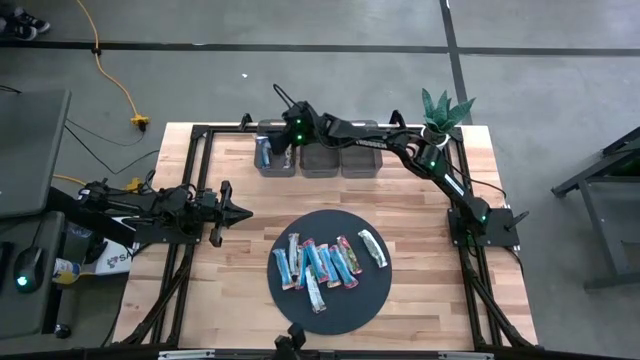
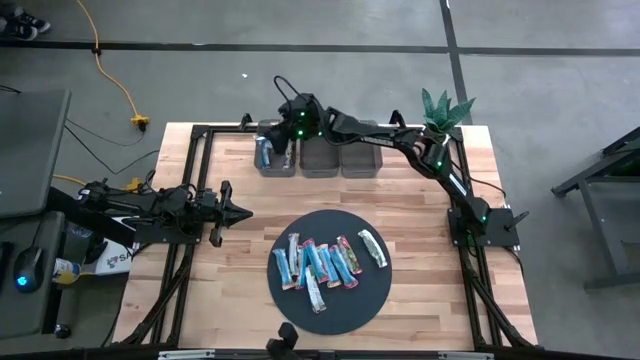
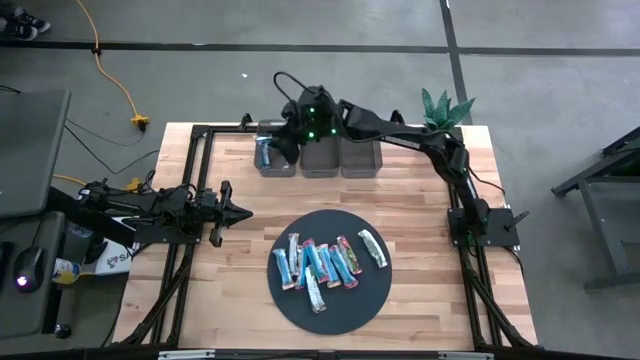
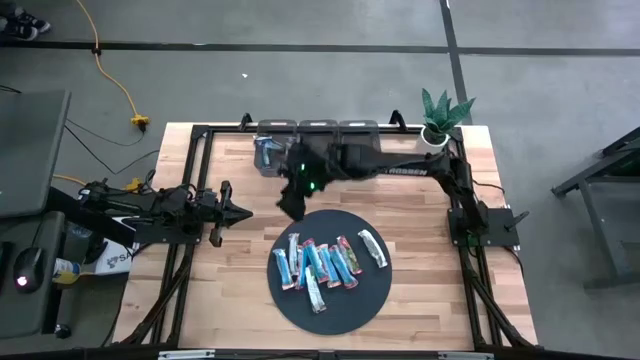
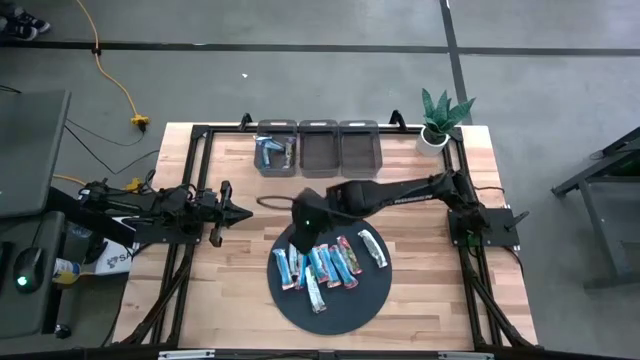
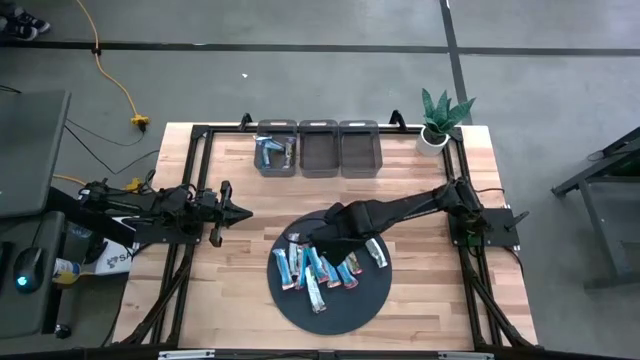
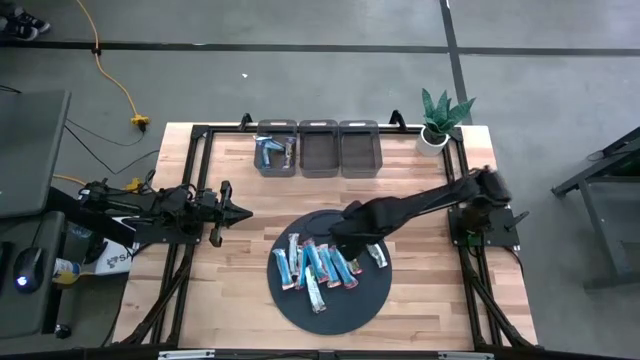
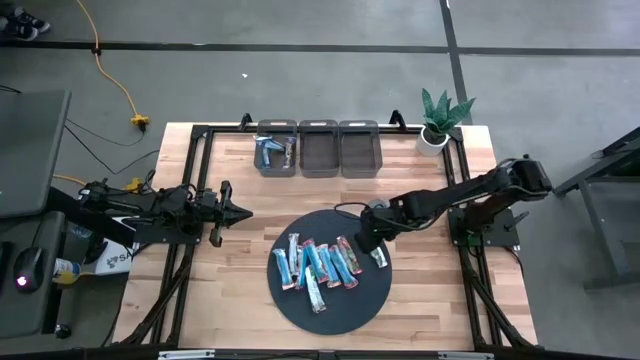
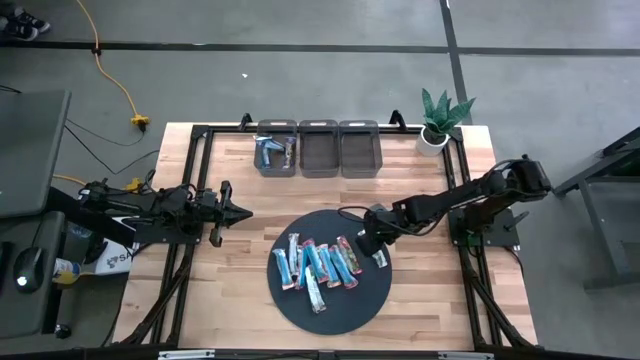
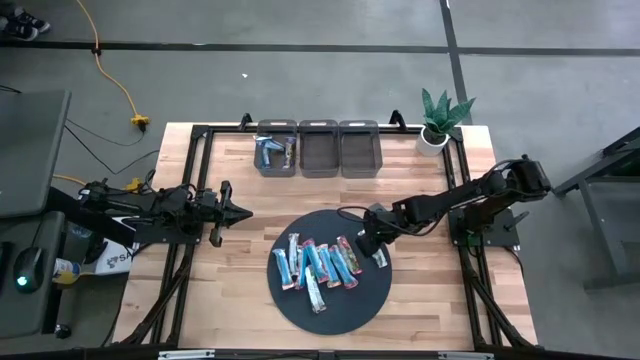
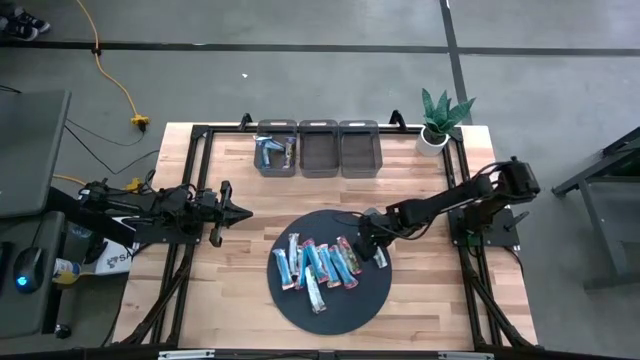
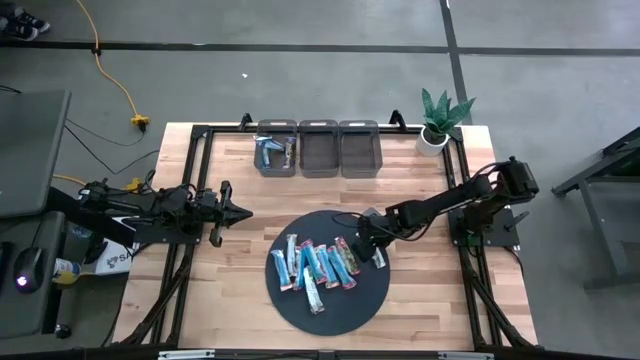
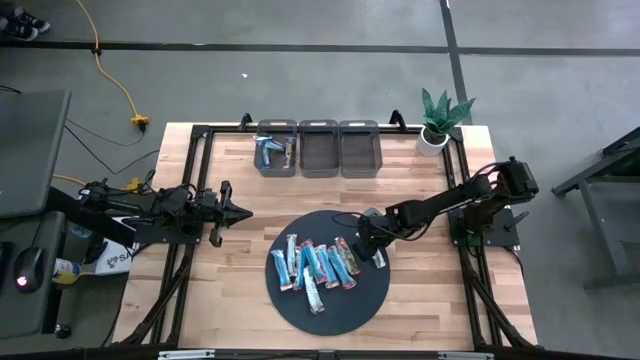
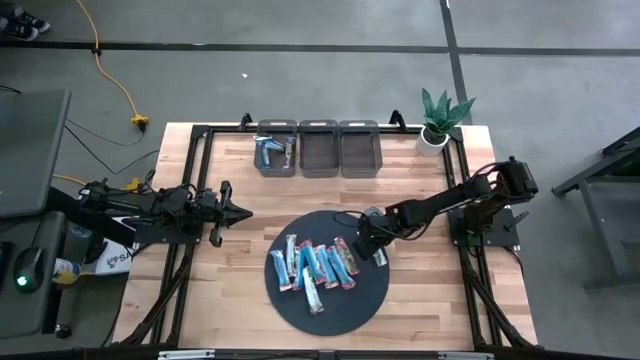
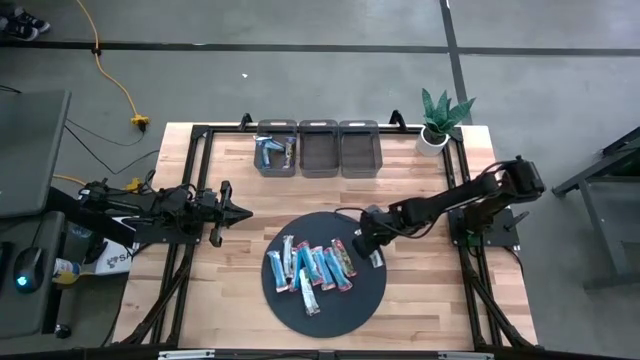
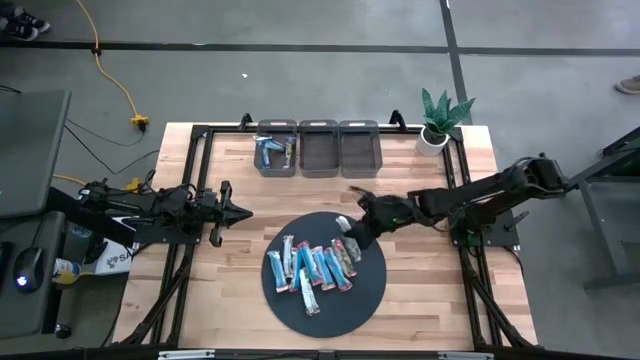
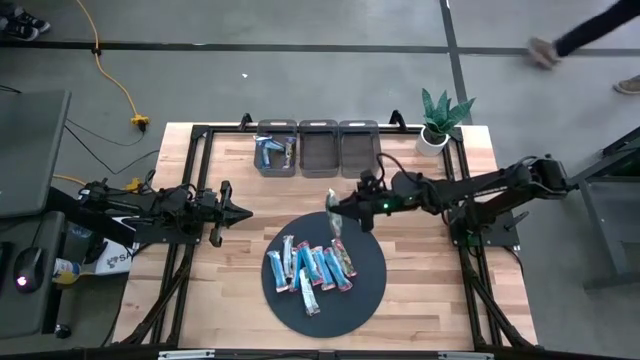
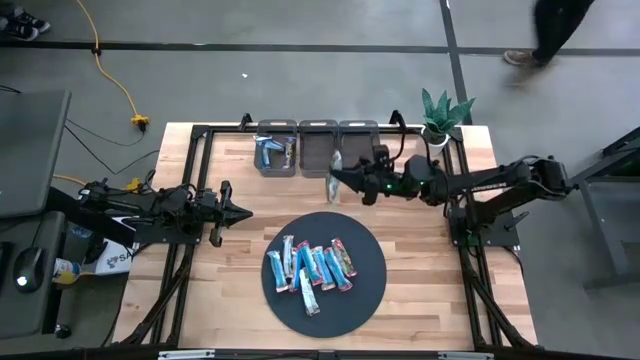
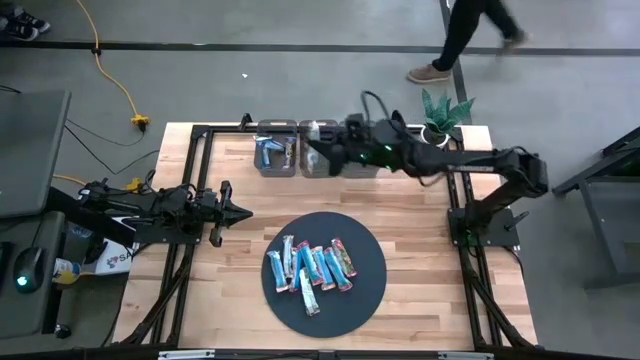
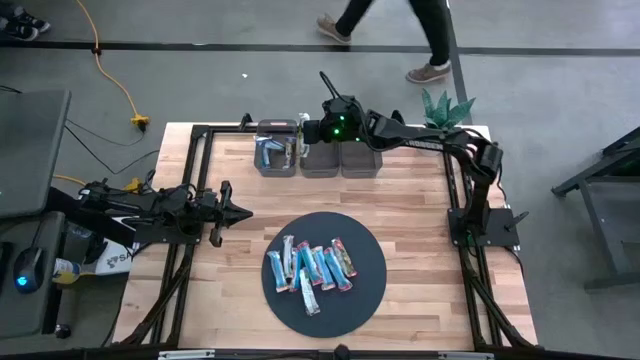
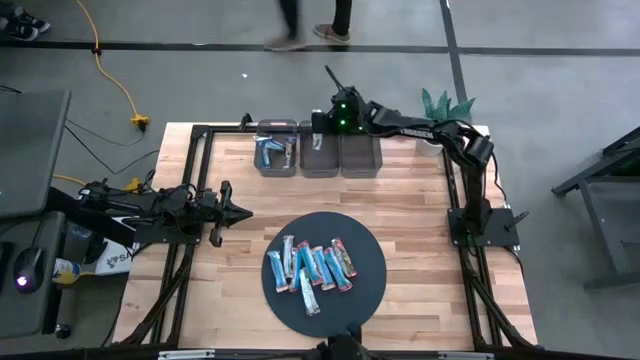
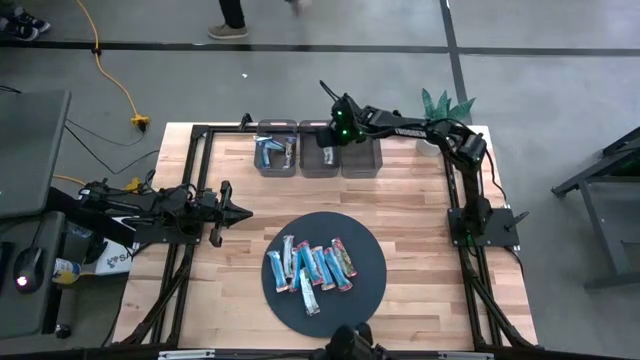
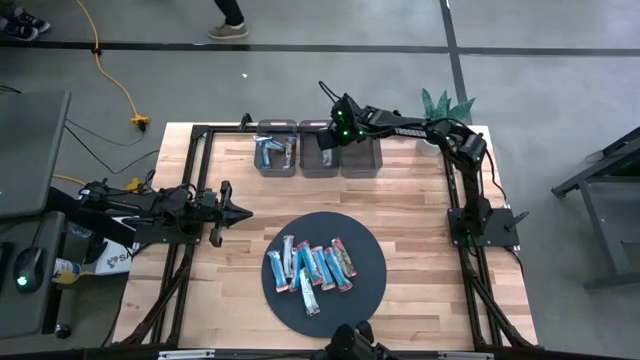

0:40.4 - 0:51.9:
Task: Pick and place Granola Bars by type
Put the yellow granola bar into the middle black bin

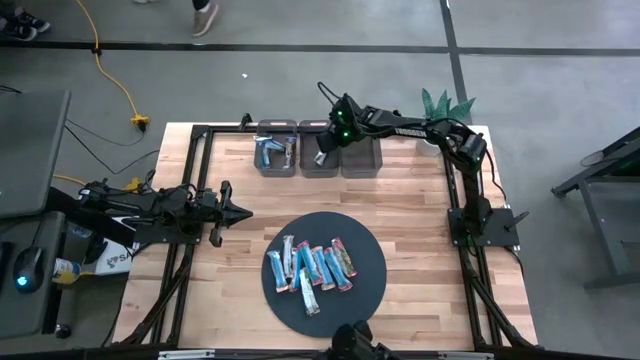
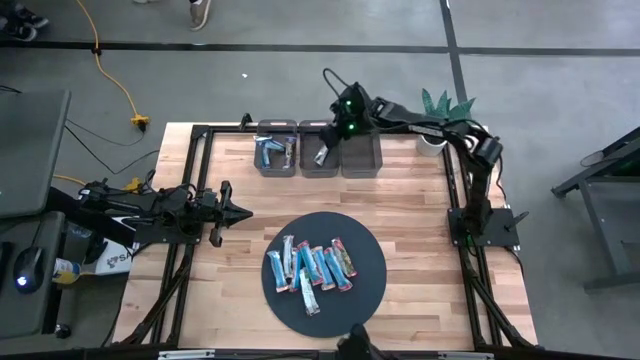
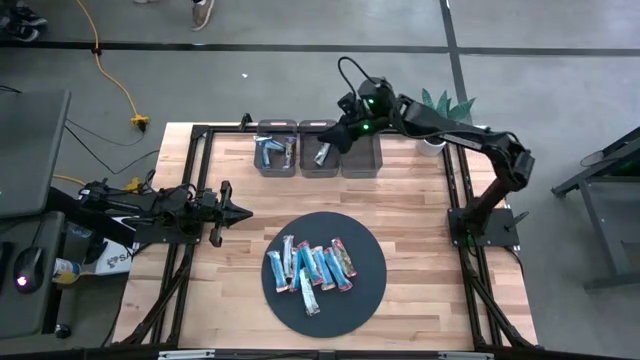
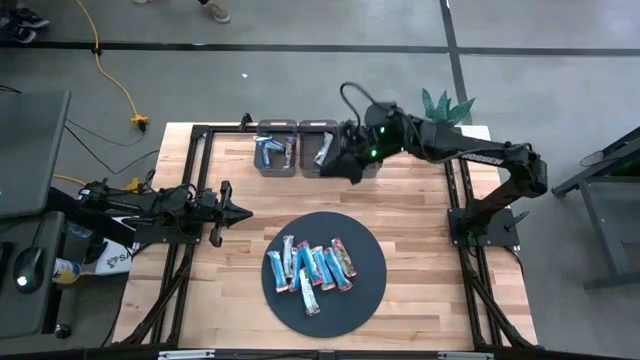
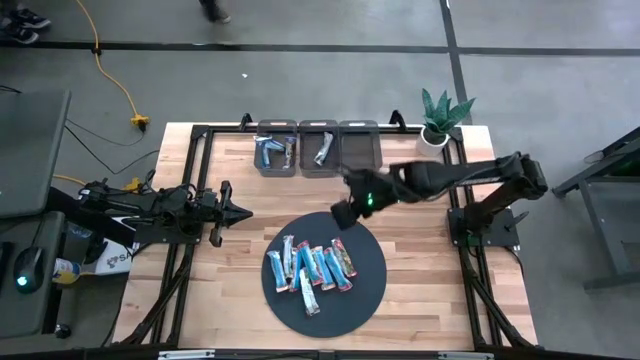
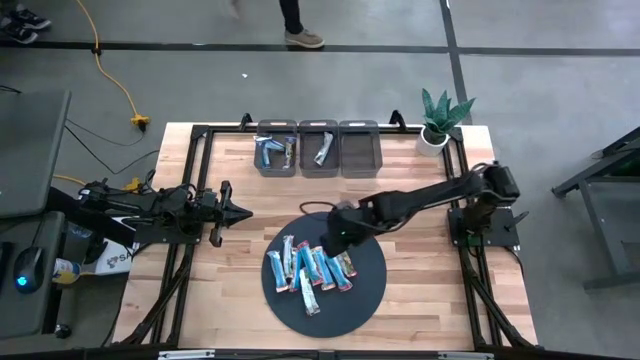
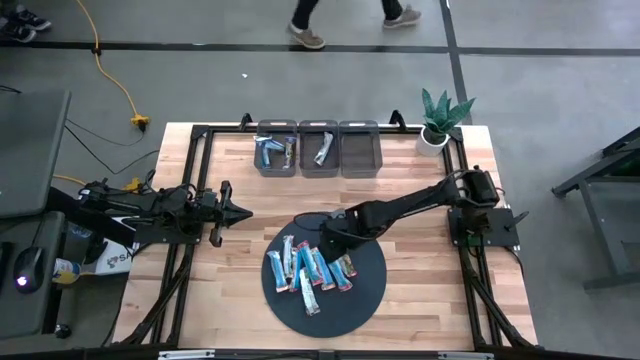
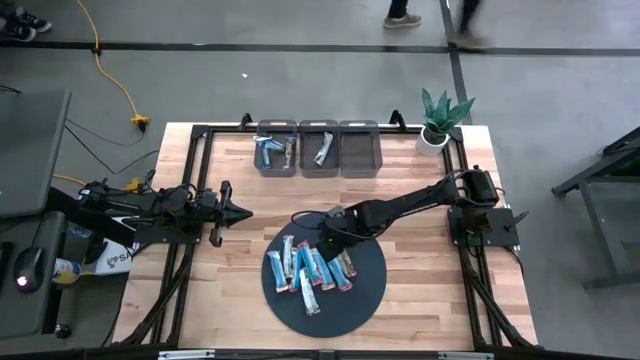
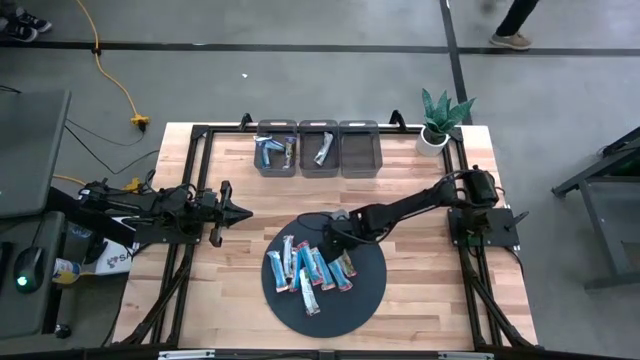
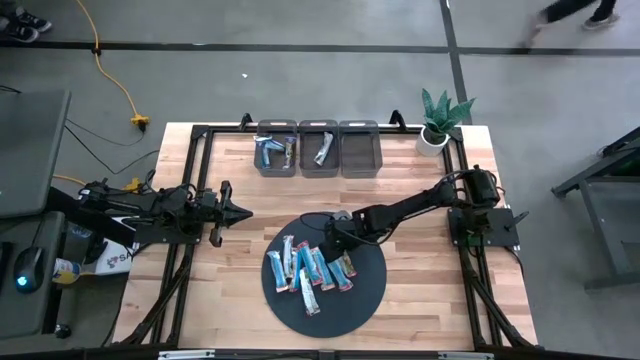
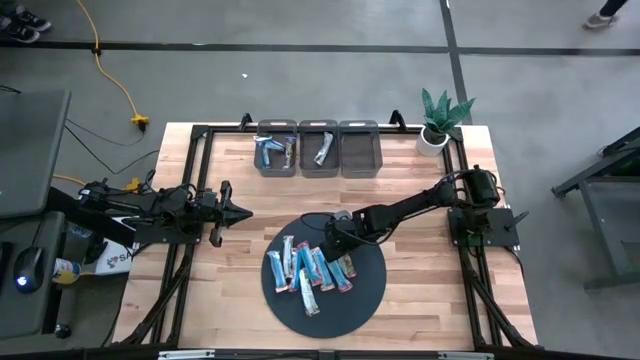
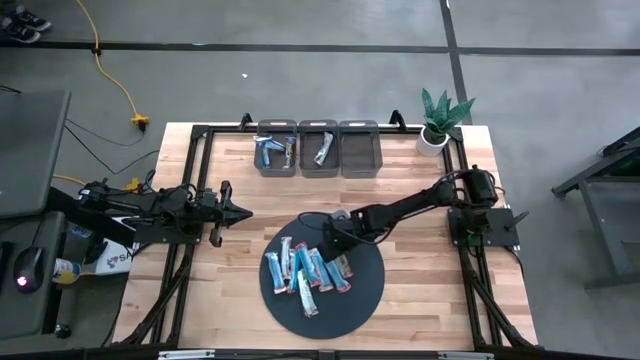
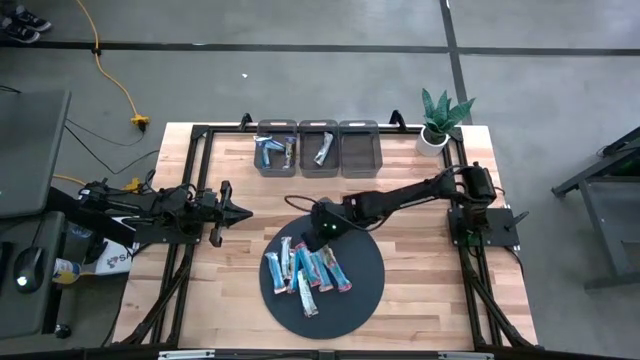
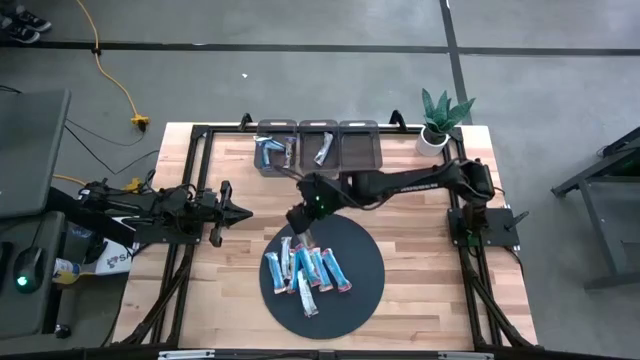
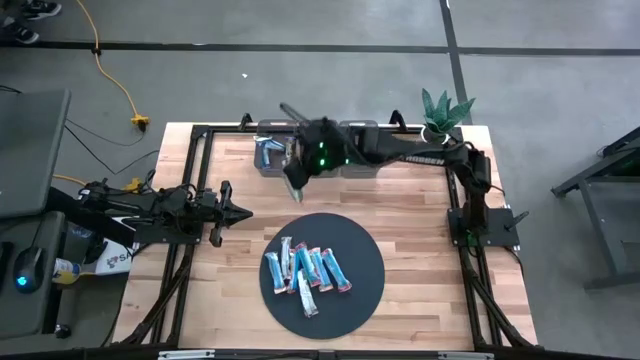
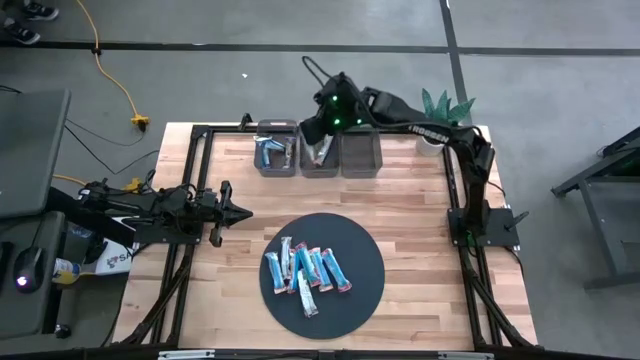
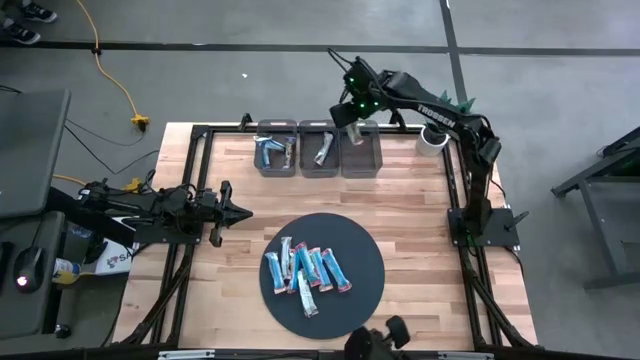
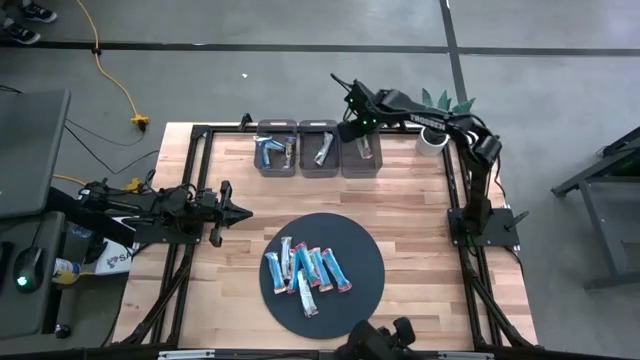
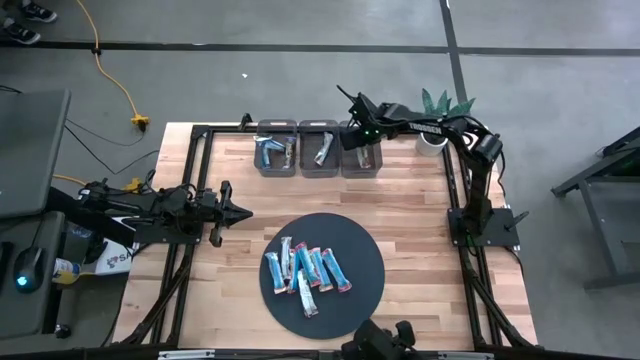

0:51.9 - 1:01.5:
Put the red granola bar into the right black bin
